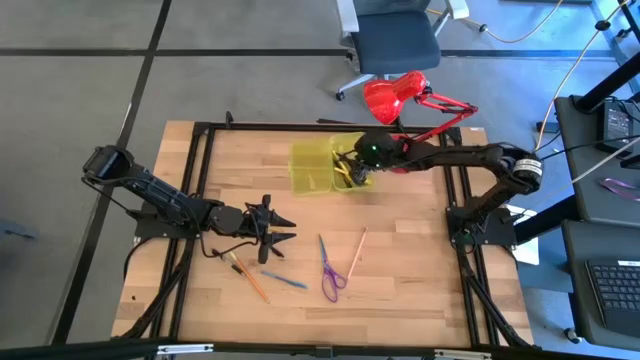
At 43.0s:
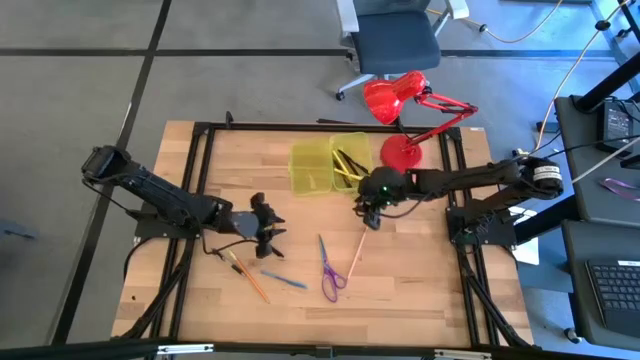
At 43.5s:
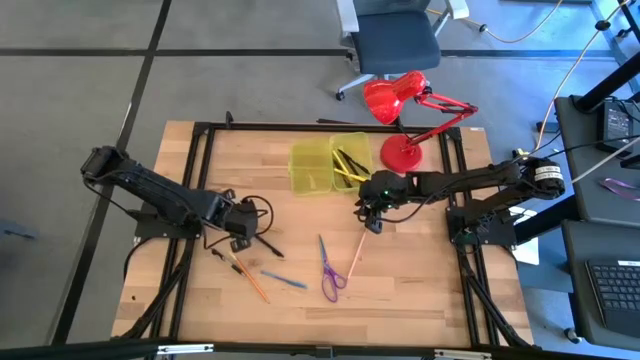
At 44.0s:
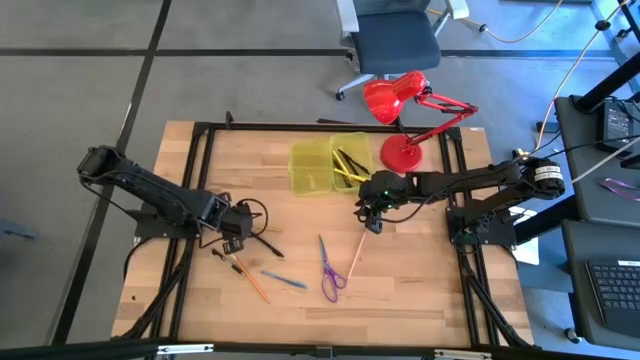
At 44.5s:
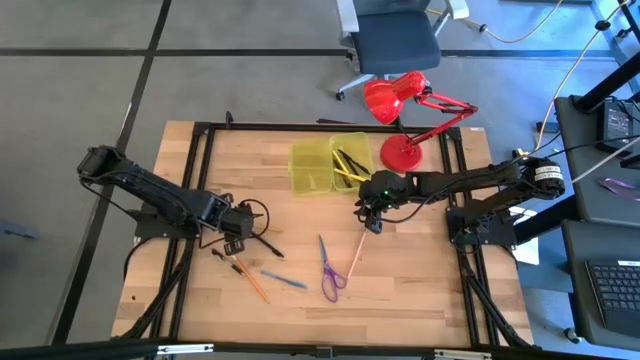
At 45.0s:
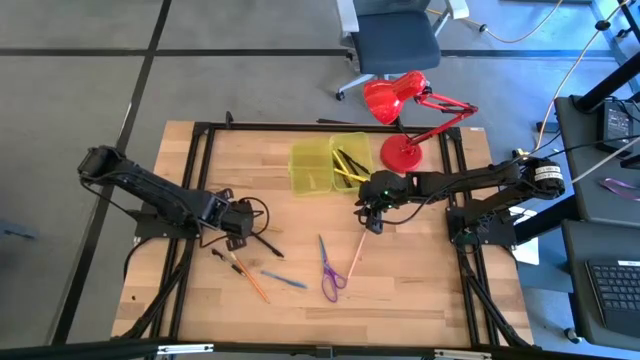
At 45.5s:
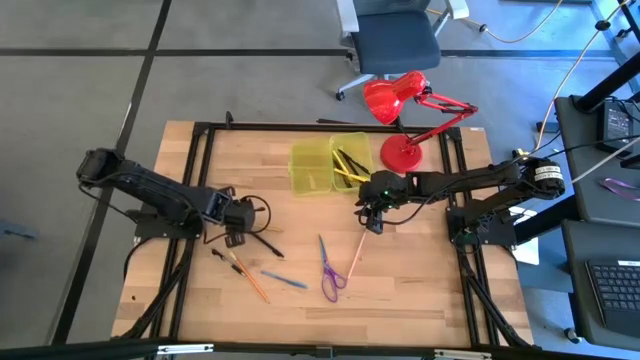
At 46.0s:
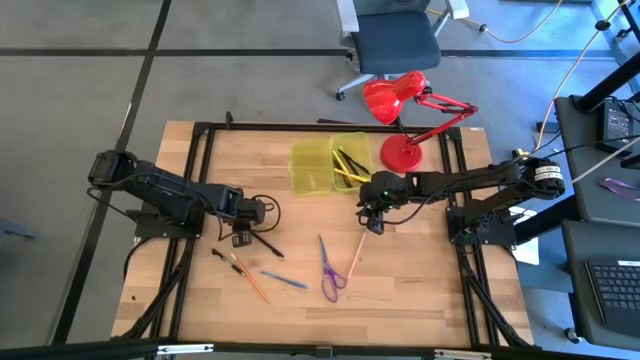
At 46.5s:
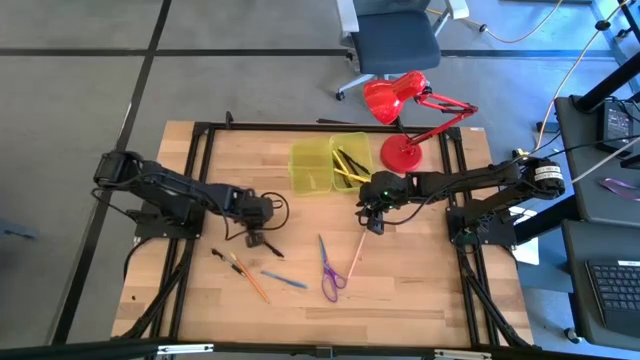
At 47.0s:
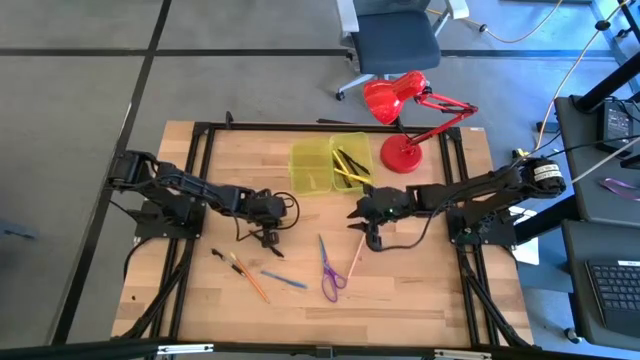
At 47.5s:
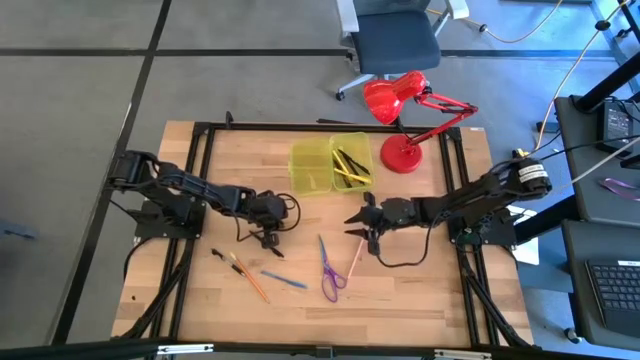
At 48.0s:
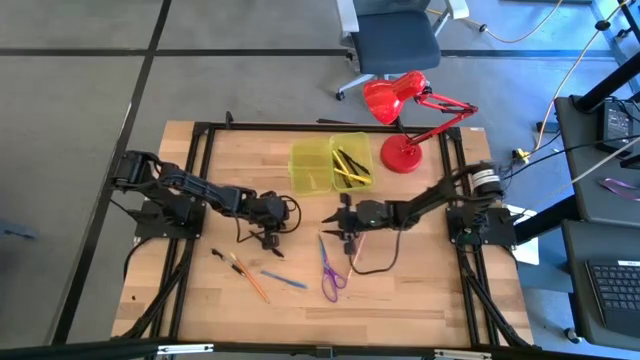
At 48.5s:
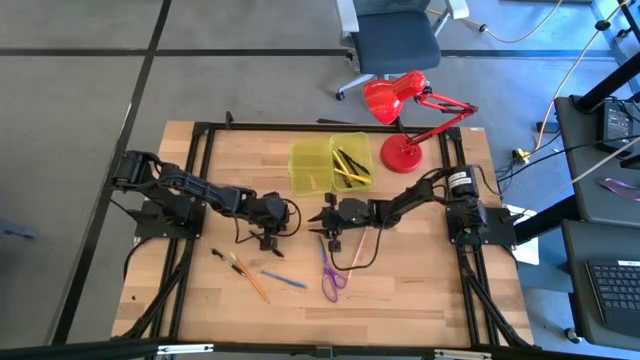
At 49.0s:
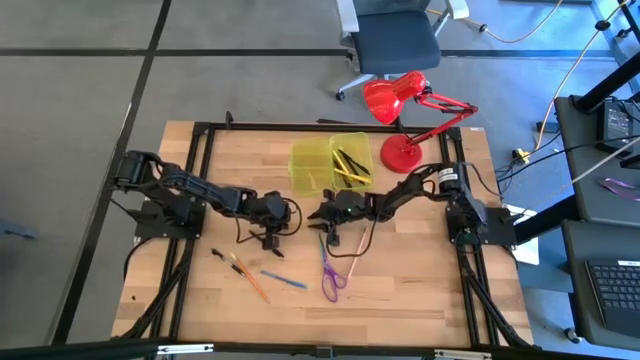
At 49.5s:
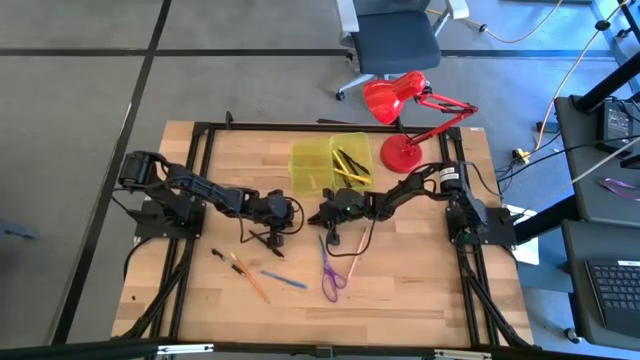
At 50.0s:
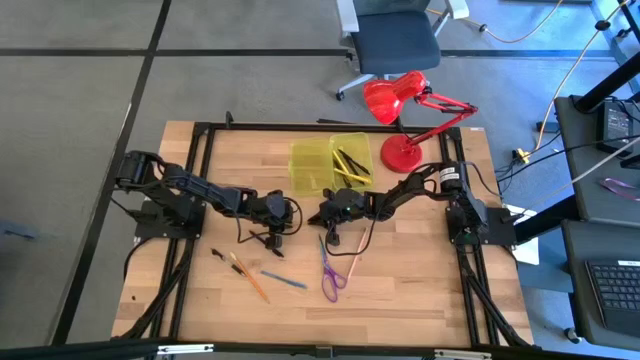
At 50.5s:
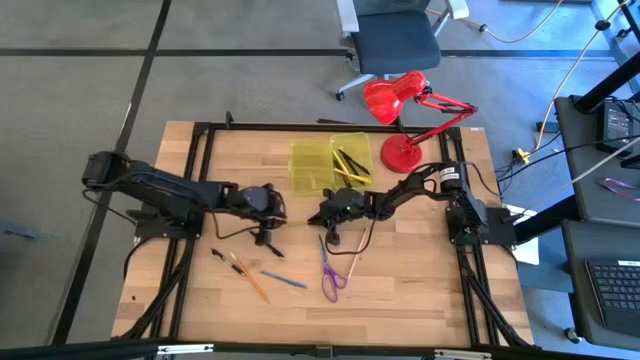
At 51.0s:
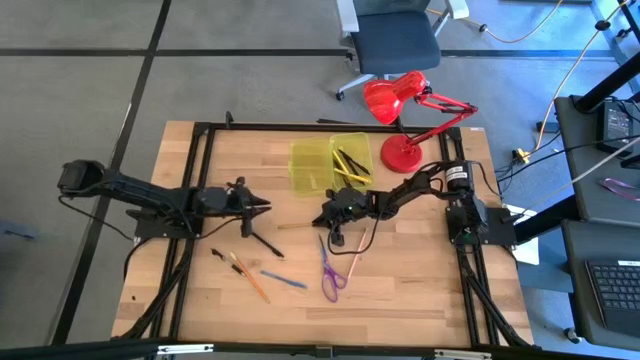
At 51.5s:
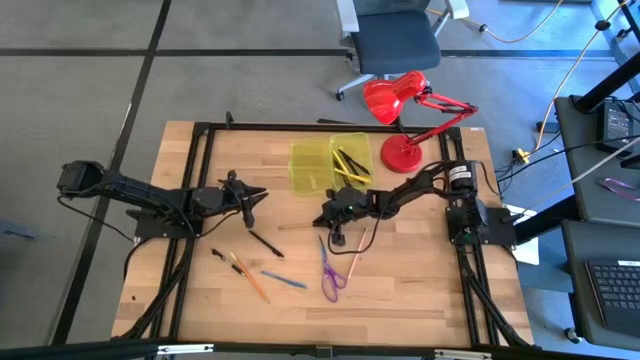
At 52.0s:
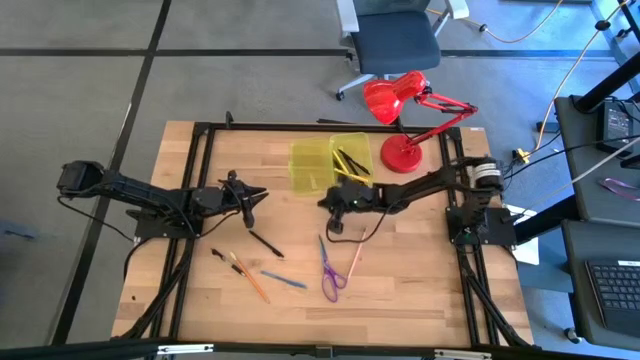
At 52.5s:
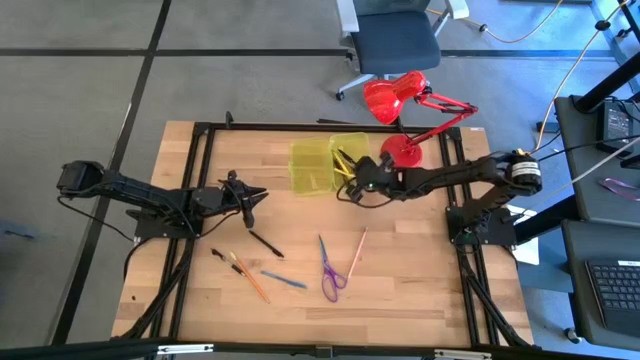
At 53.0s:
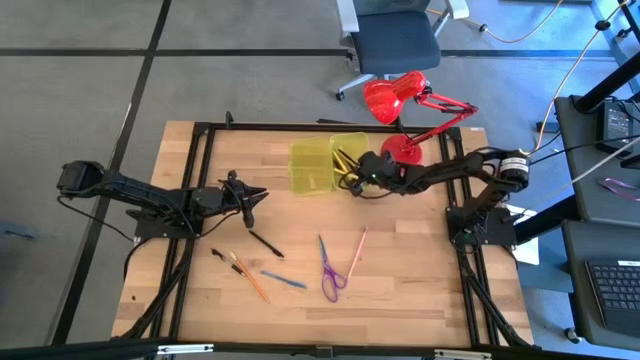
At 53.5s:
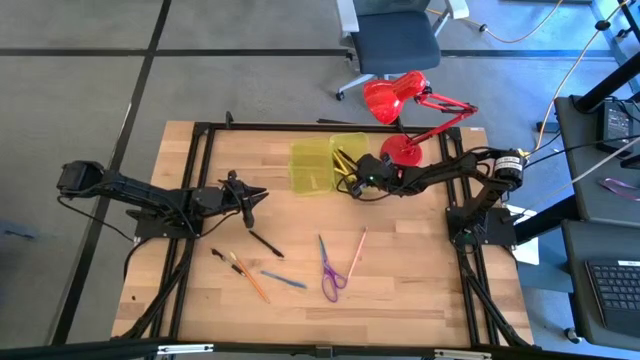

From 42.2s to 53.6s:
Task: Pick & place school supplies into a supply box
Put the yellow pencil into the yellow supply box

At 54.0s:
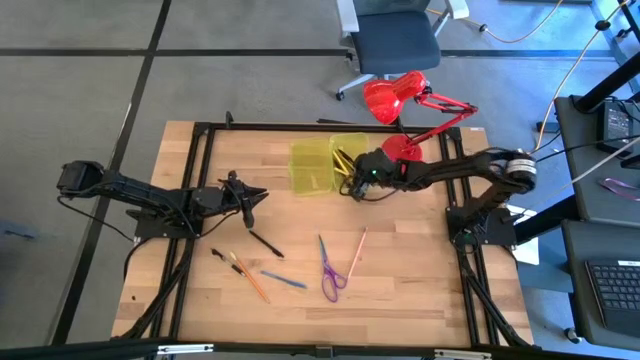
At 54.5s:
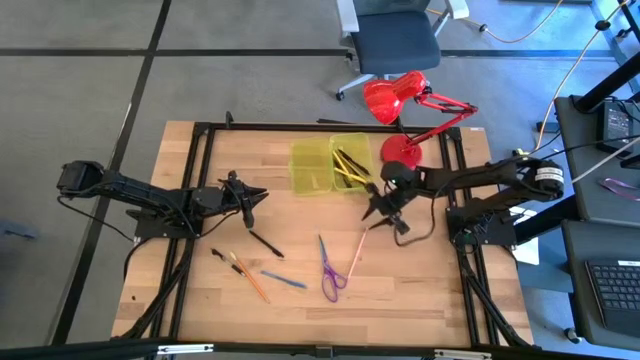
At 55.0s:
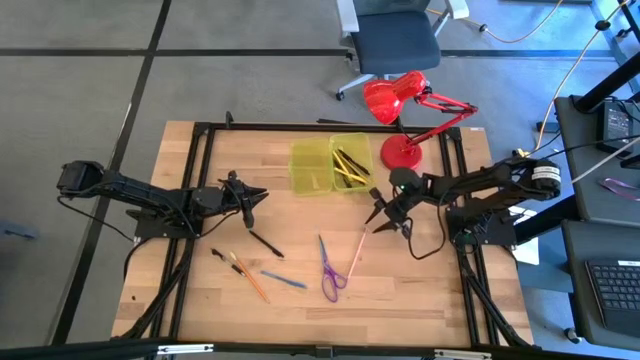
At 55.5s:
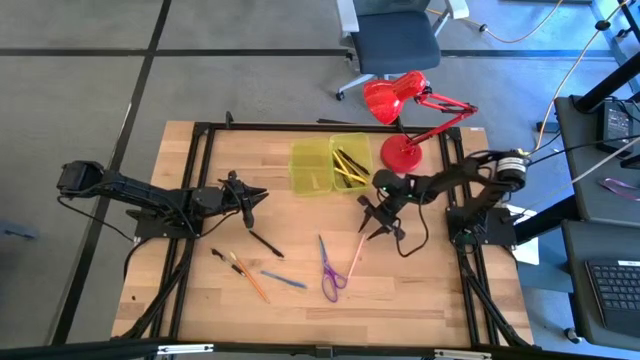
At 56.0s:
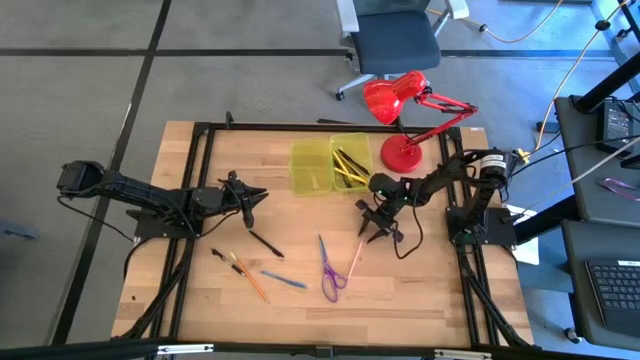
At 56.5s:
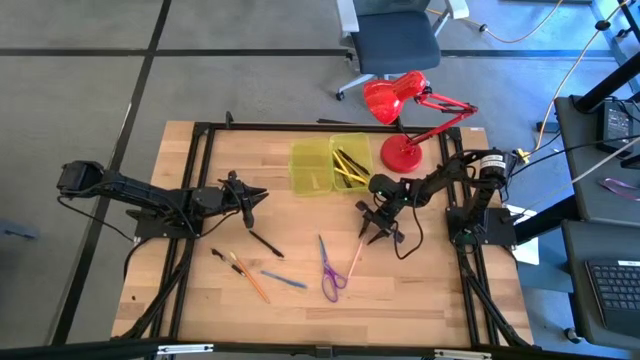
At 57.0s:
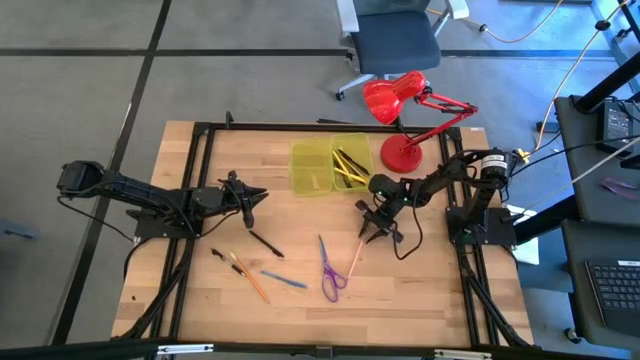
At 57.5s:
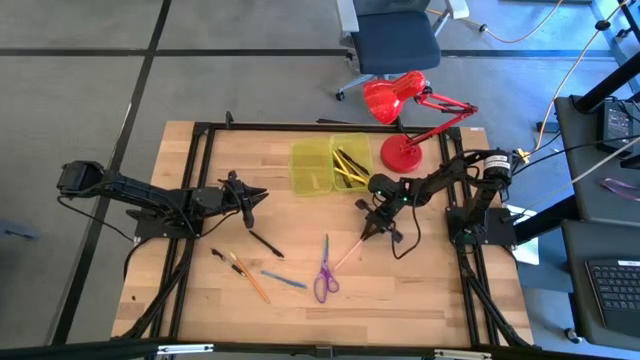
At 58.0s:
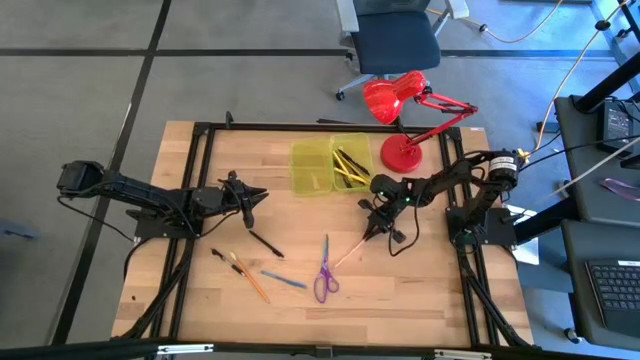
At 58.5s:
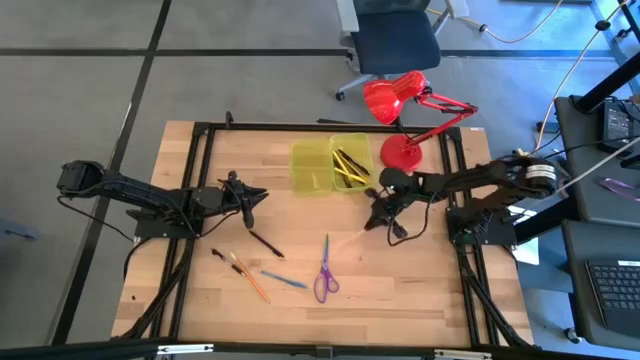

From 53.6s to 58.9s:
Put the pink pencil into the yellow supply box

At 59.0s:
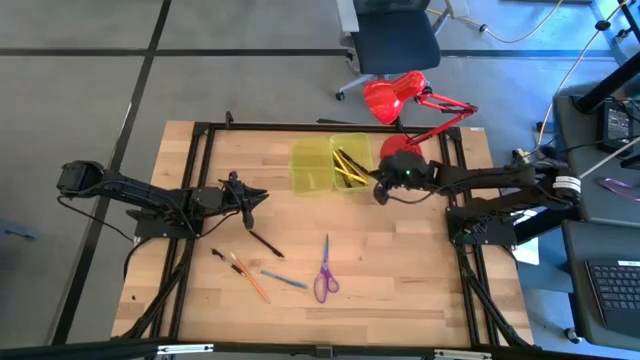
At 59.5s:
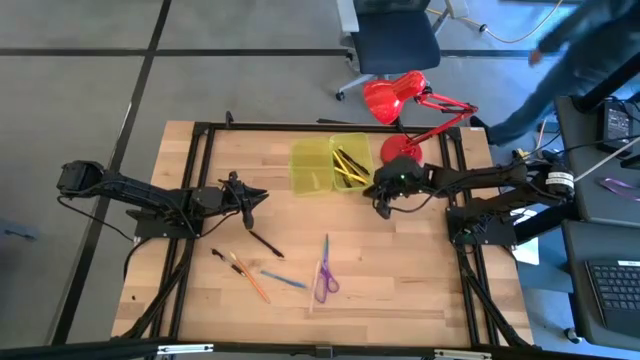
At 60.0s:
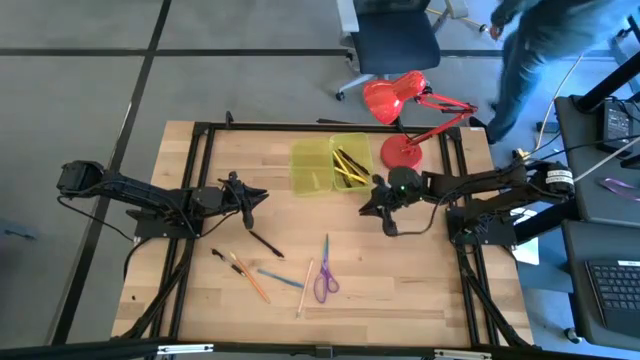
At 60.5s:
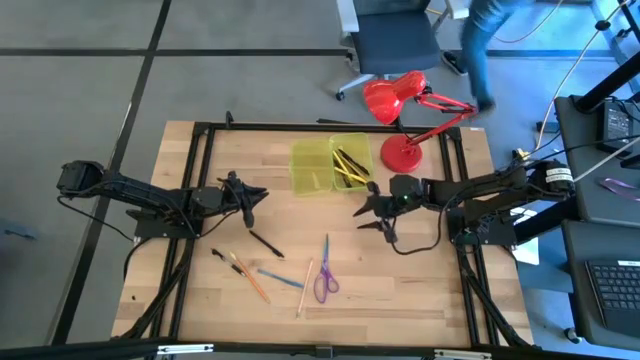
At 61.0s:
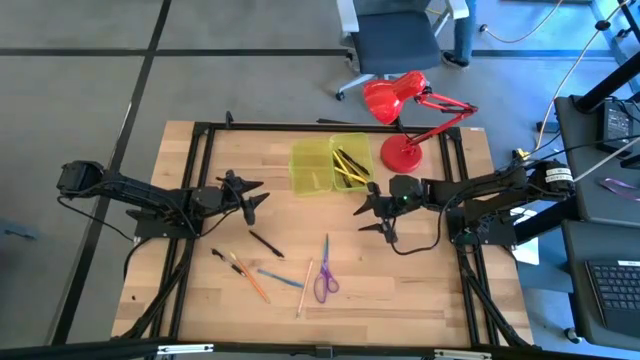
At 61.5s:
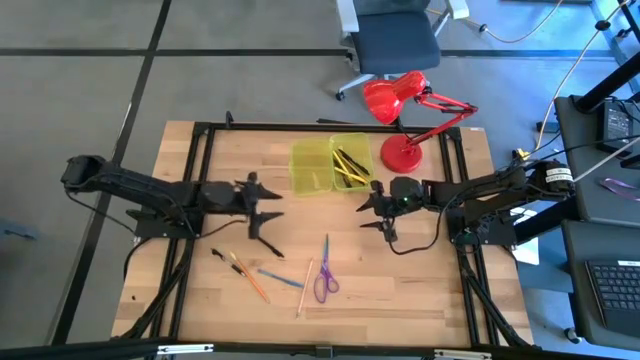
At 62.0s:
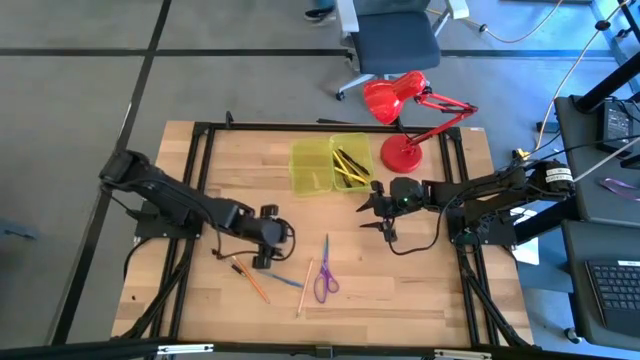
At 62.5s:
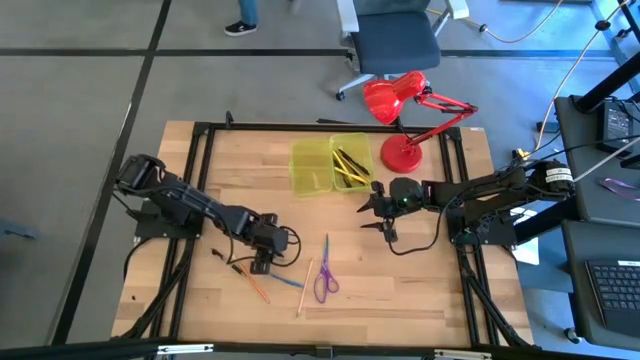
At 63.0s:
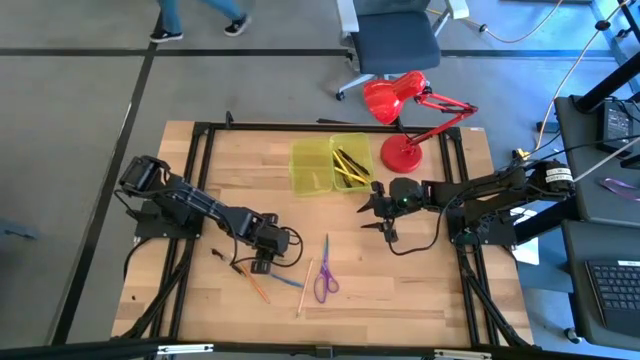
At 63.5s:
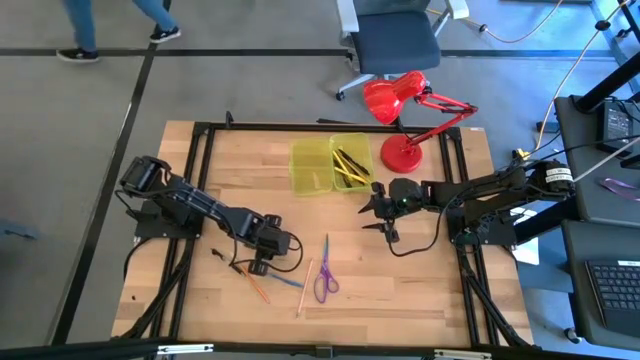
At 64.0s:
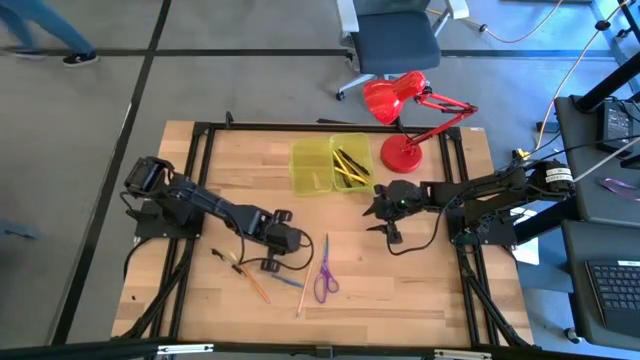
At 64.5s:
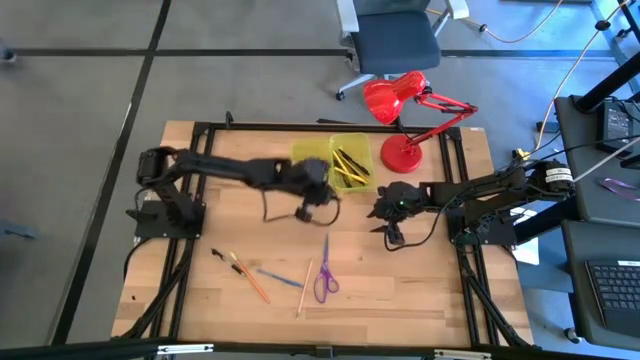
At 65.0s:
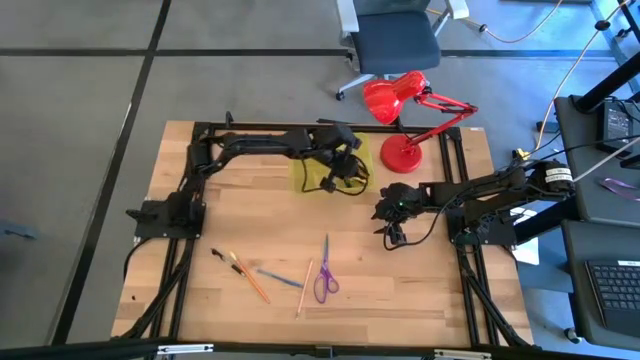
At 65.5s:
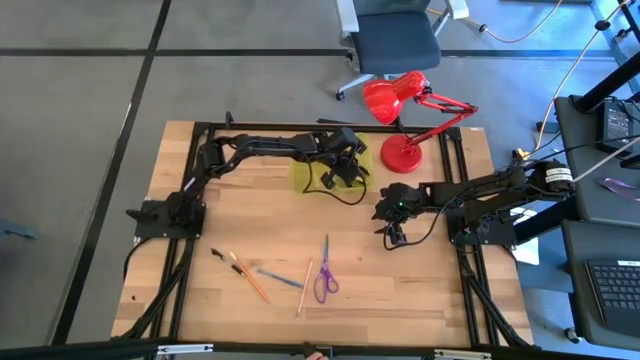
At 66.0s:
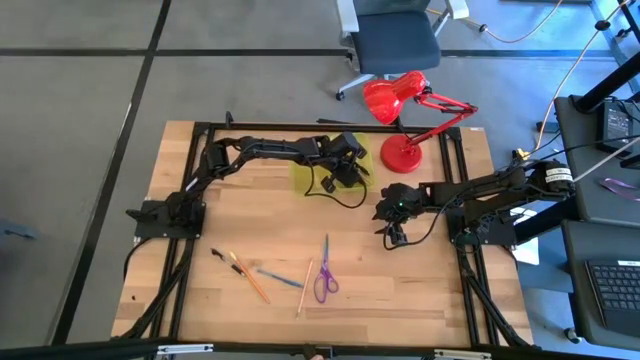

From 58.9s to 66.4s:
Put the top black pen into the yellow supply box
